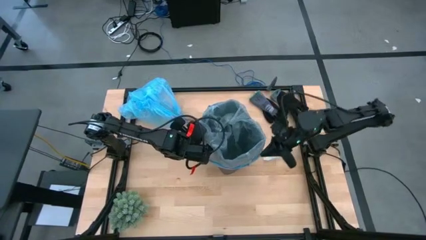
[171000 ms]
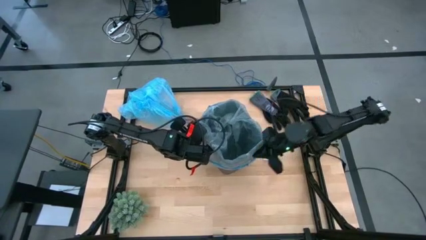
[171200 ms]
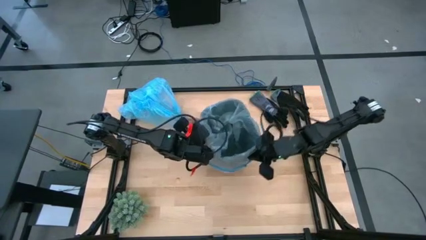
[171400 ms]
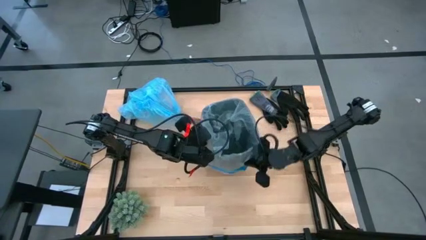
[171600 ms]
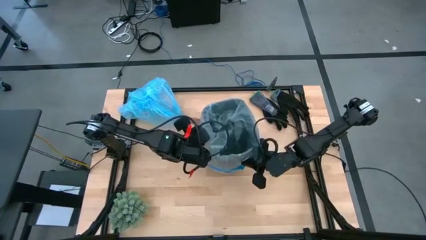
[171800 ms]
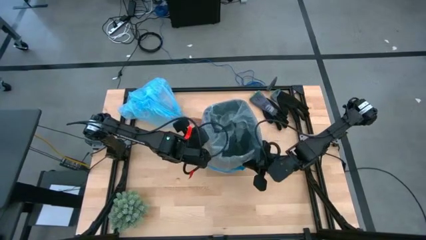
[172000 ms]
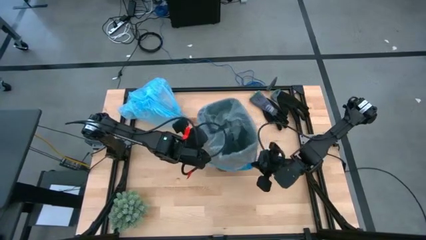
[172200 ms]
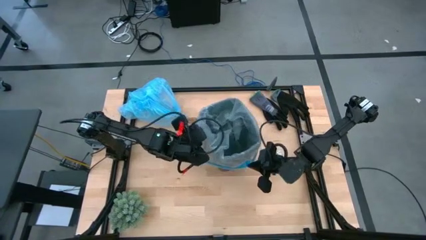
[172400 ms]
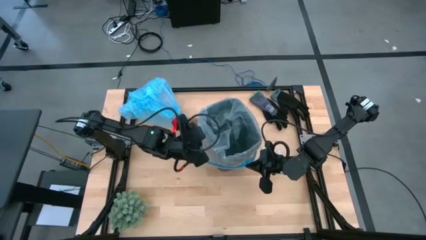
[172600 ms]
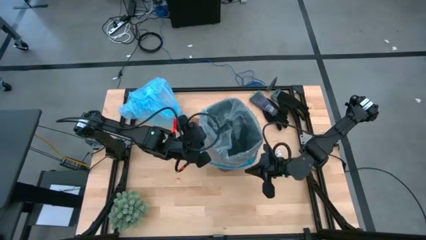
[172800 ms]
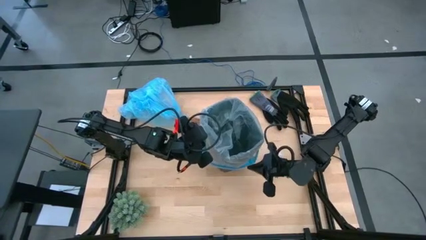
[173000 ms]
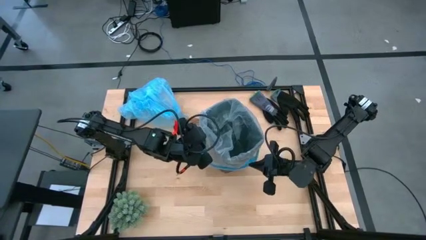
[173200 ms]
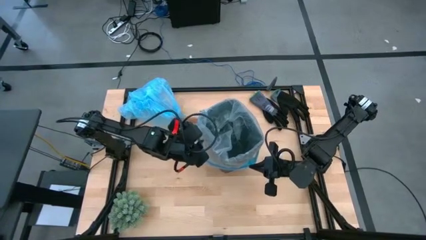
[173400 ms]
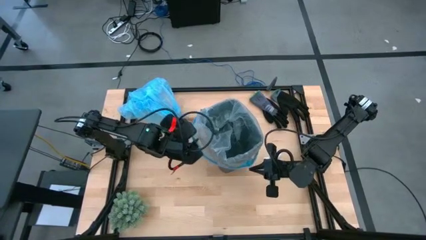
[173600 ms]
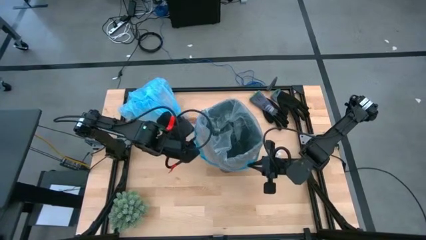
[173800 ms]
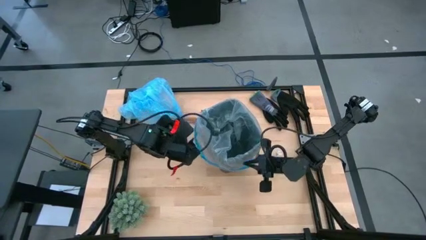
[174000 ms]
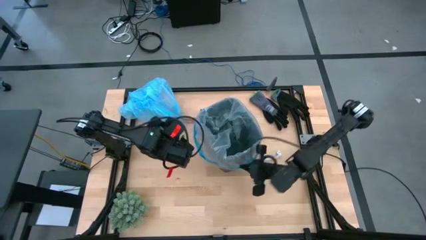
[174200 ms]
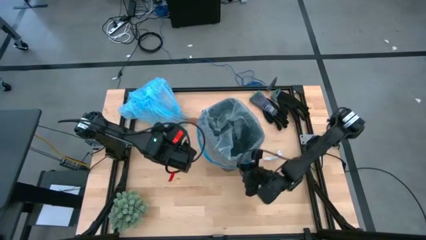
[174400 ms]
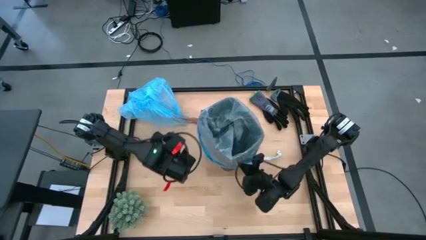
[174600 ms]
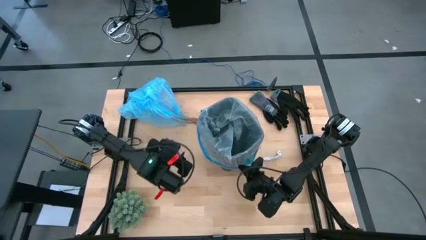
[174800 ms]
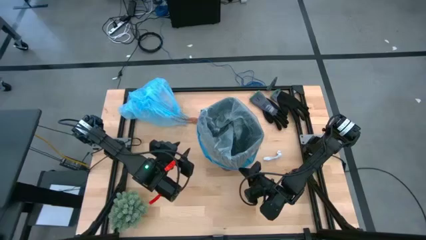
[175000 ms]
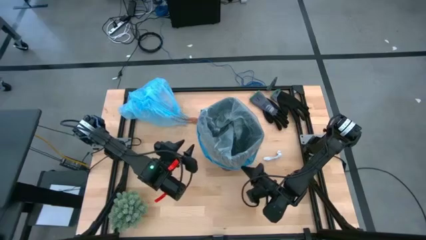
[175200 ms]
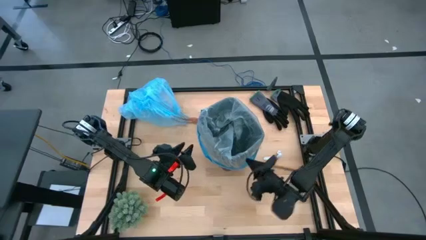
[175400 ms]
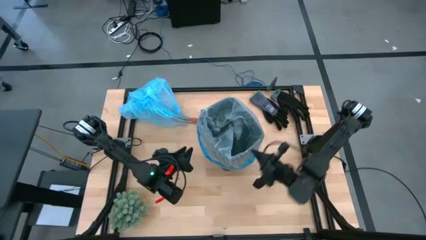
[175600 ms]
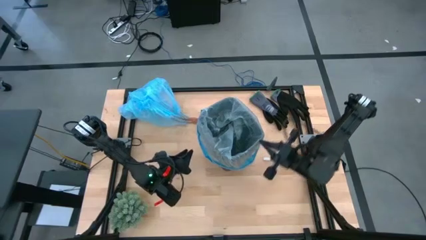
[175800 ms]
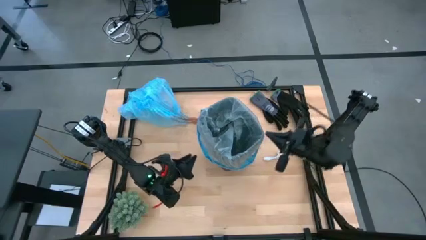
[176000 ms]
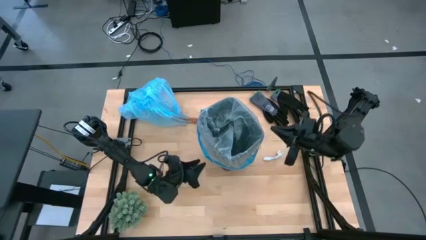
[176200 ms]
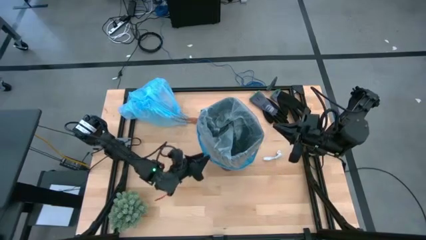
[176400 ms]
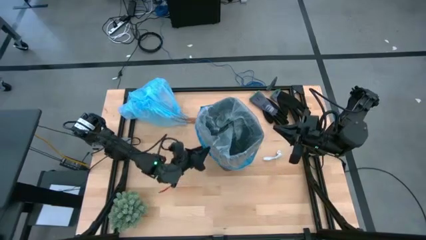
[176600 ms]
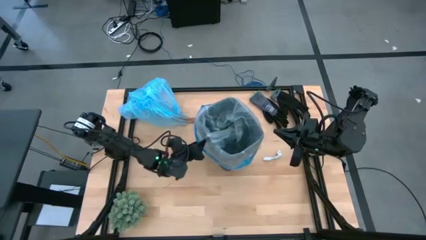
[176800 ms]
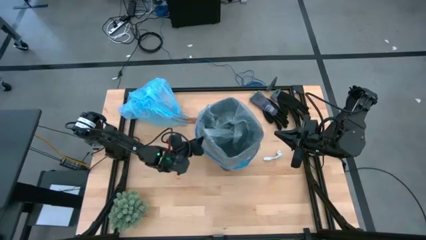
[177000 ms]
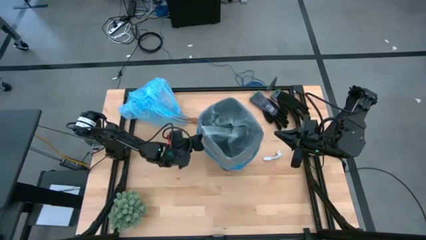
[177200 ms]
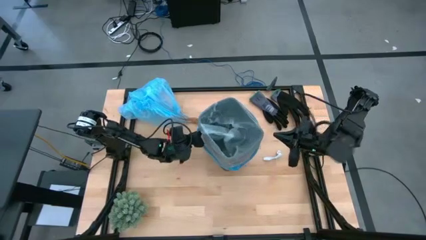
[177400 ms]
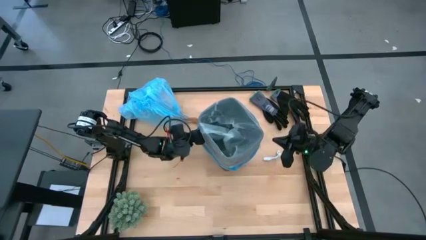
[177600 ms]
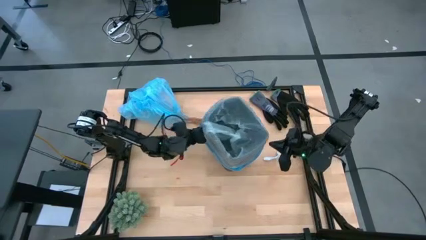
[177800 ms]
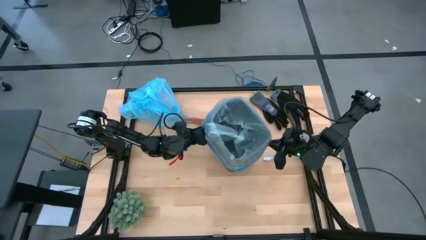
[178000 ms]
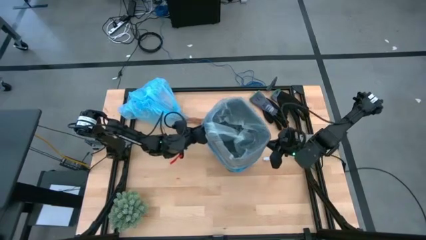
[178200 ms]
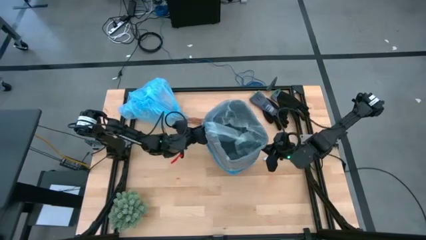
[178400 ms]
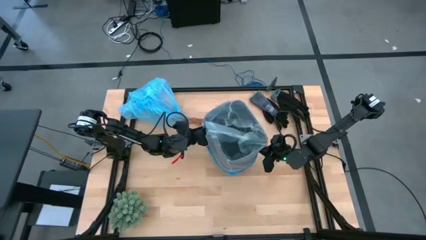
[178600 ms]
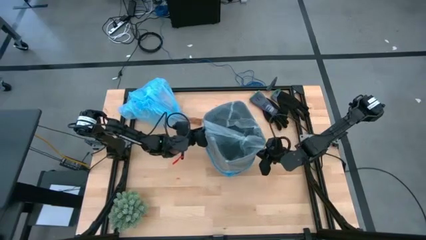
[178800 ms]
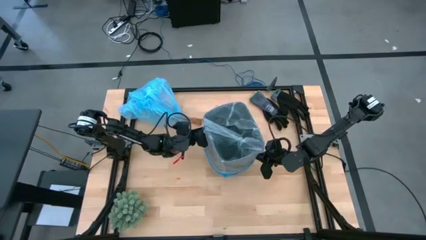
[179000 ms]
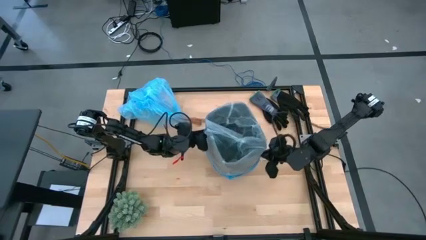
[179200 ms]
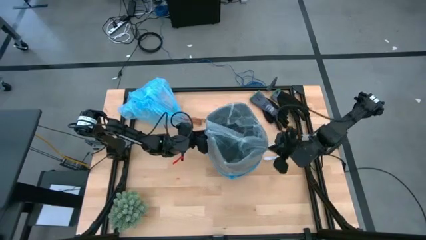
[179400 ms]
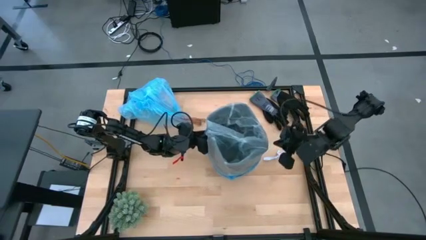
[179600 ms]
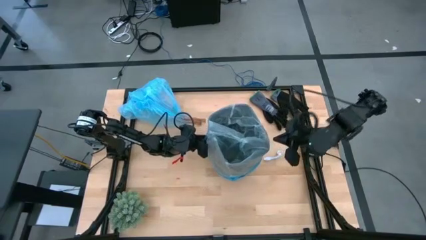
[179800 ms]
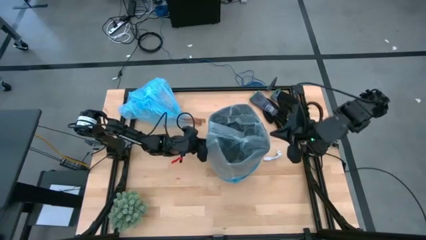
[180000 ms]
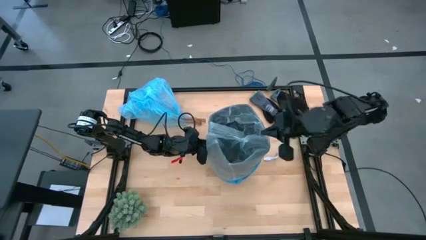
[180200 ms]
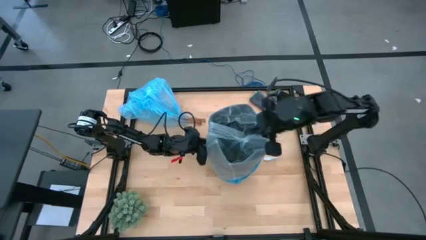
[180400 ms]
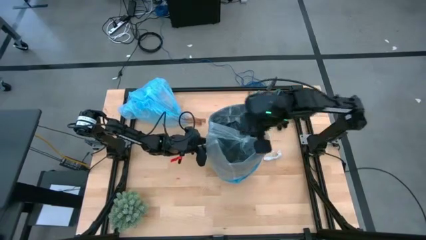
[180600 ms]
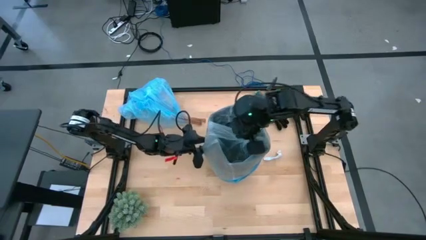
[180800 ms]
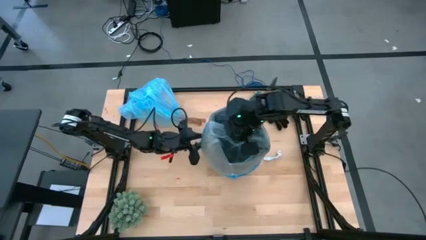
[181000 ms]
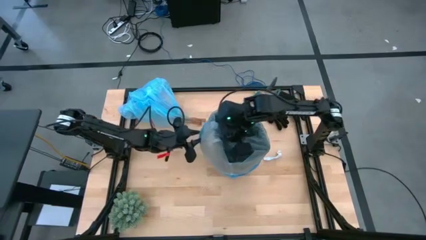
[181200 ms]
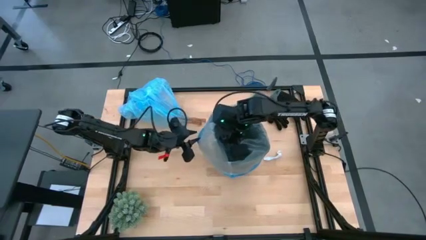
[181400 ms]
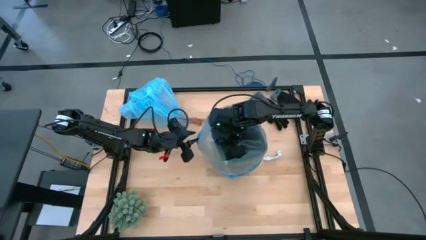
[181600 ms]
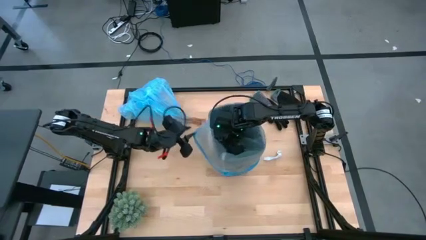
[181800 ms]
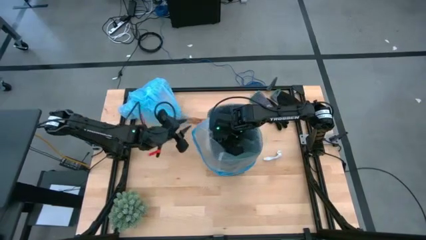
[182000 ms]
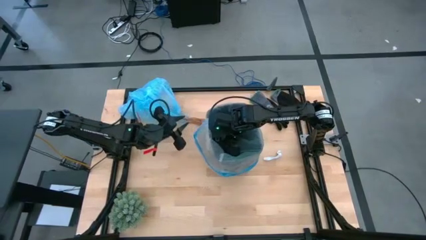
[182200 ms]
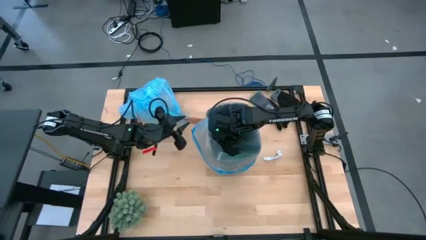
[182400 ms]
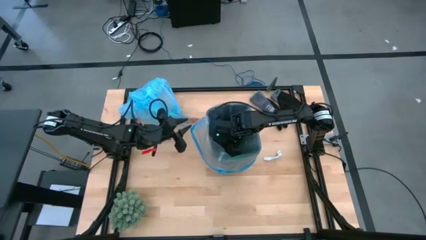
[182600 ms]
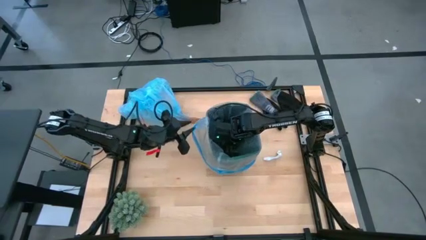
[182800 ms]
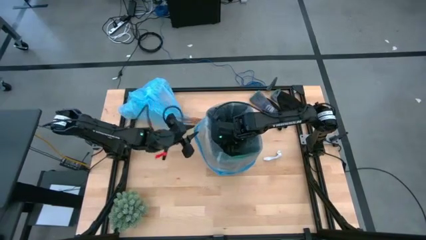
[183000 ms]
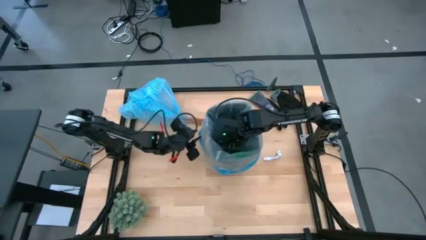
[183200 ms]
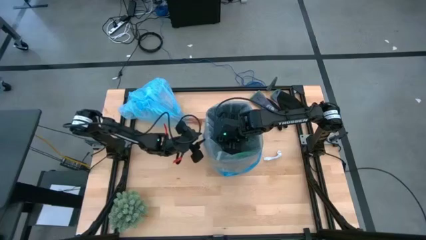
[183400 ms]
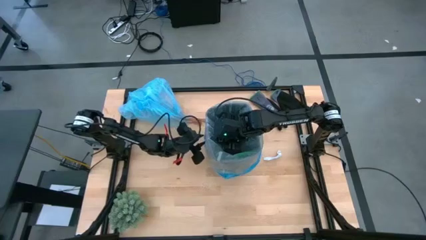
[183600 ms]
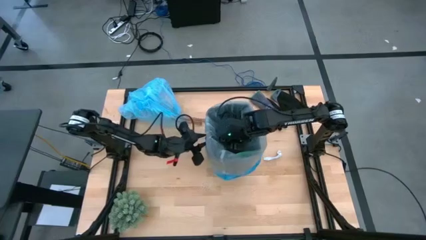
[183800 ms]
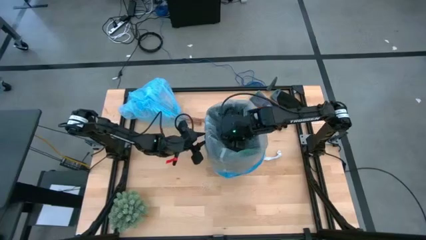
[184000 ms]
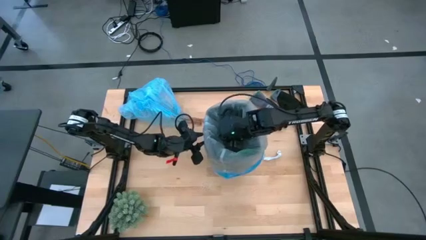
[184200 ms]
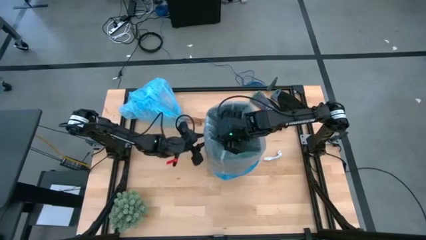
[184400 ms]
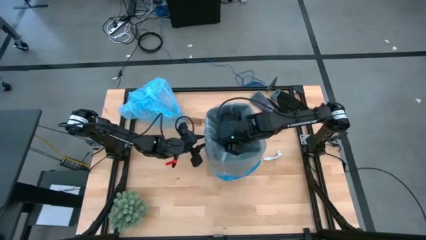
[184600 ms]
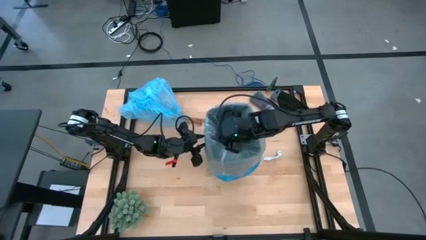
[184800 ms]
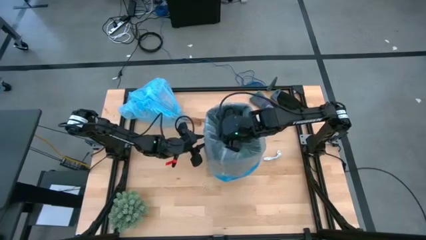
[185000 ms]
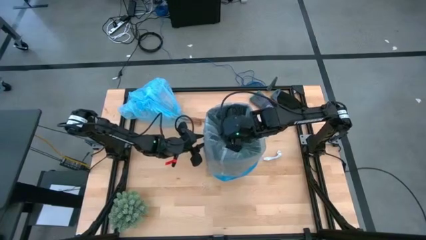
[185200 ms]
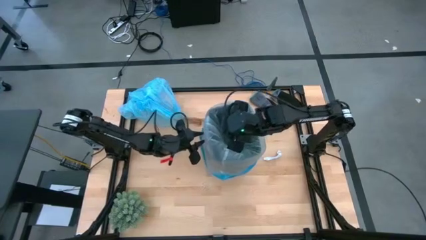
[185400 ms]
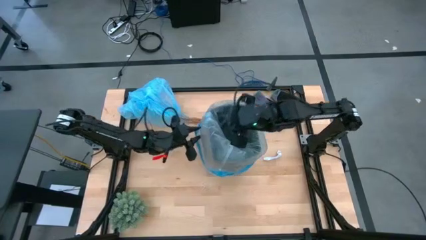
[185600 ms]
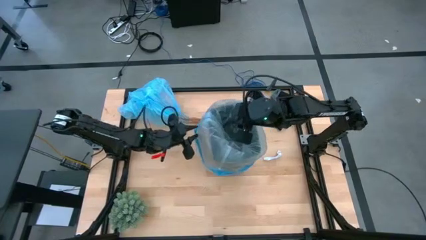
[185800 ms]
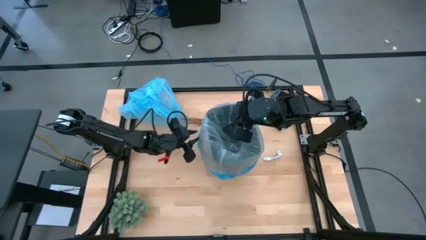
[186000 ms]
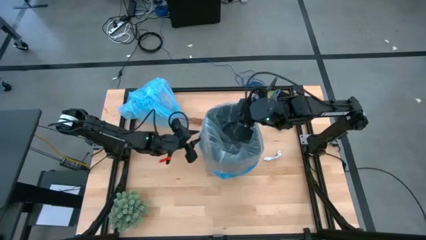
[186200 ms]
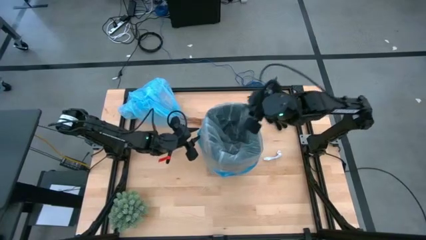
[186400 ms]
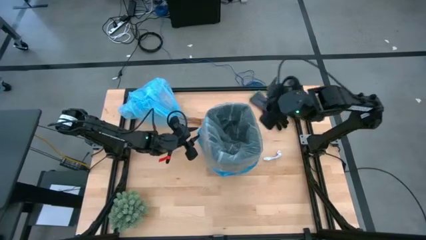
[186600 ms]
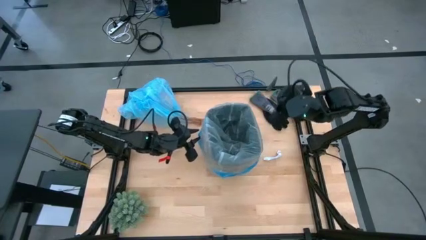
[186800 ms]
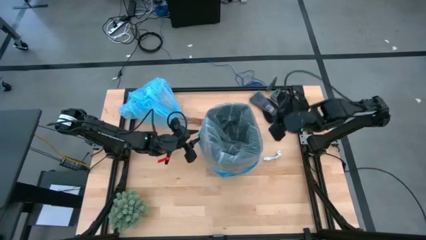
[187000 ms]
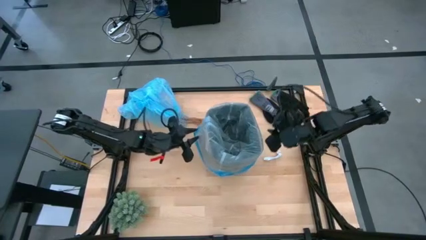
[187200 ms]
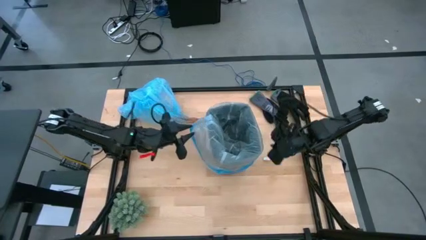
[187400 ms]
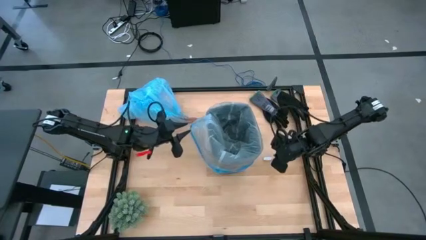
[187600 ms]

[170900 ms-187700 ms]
Task: place trash/remove bag and relplace
Insert a new trash bag into the bin
